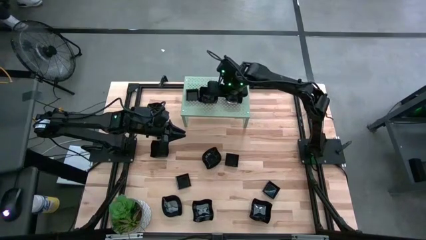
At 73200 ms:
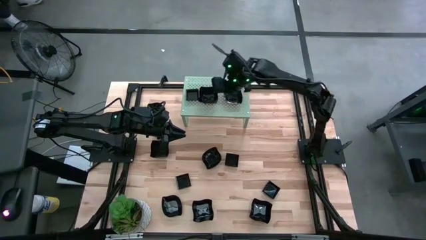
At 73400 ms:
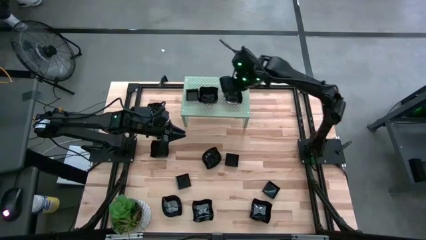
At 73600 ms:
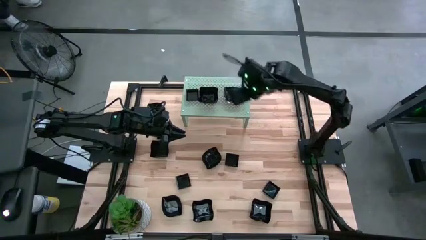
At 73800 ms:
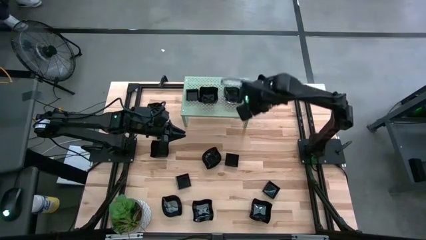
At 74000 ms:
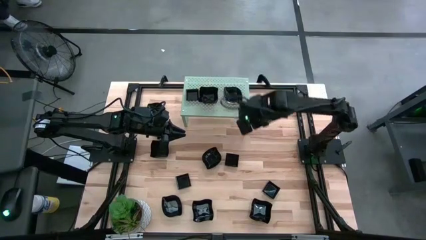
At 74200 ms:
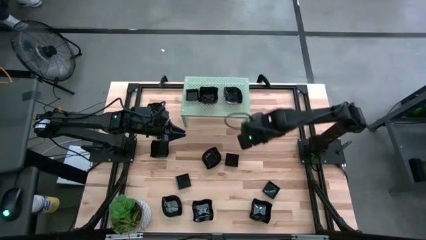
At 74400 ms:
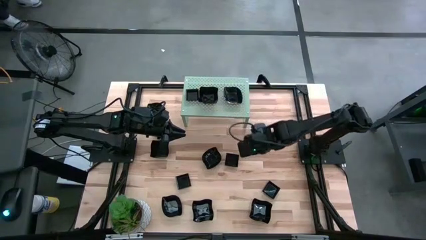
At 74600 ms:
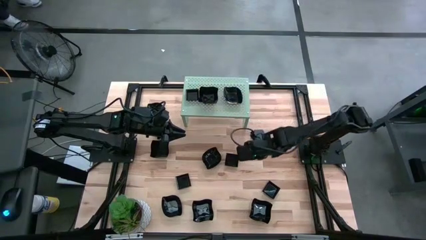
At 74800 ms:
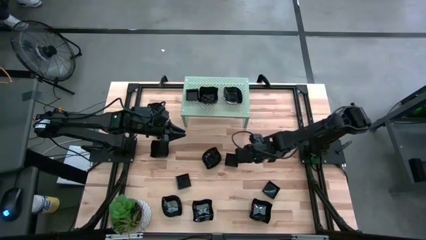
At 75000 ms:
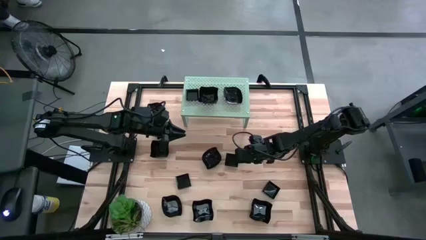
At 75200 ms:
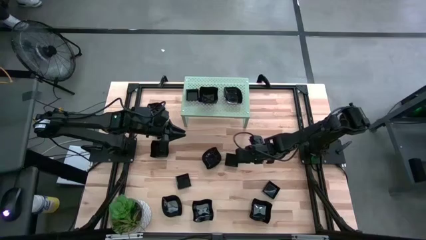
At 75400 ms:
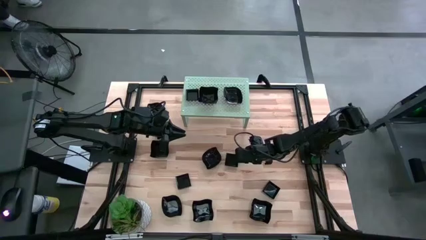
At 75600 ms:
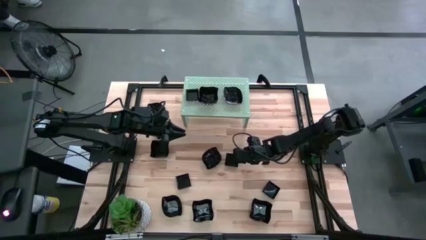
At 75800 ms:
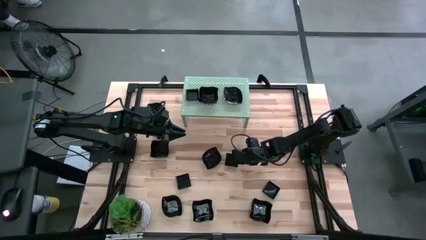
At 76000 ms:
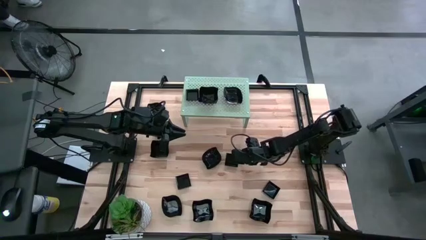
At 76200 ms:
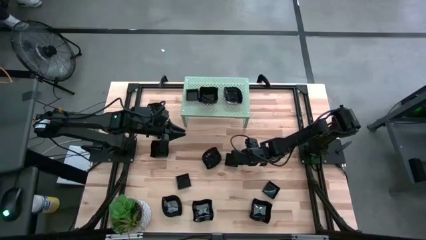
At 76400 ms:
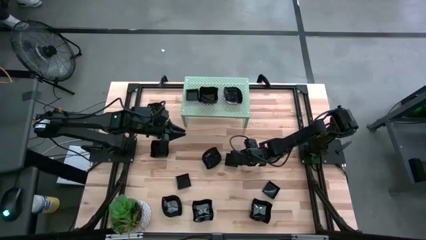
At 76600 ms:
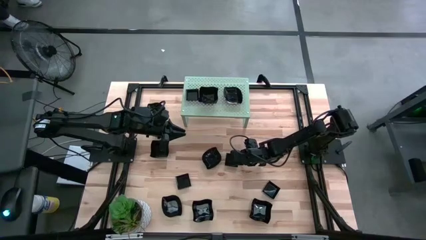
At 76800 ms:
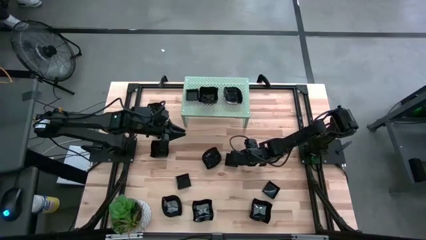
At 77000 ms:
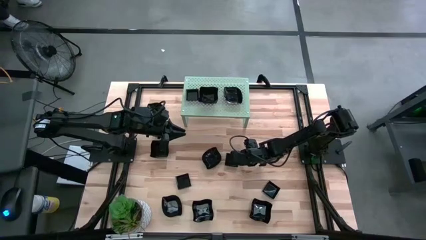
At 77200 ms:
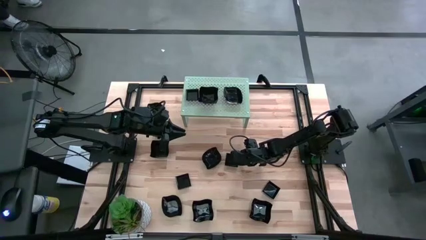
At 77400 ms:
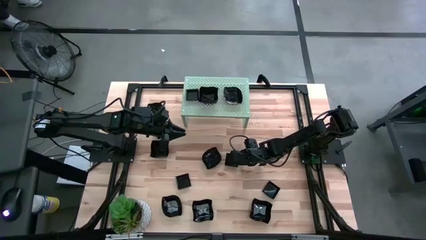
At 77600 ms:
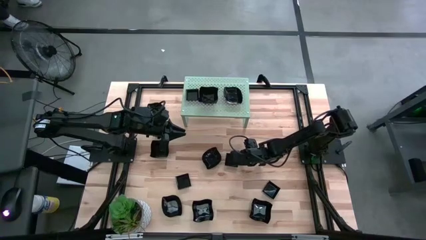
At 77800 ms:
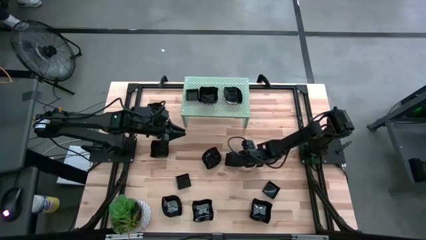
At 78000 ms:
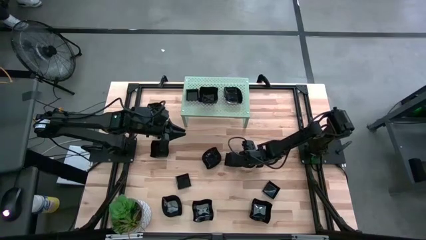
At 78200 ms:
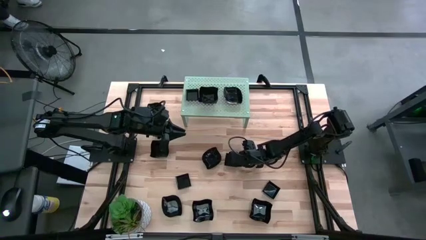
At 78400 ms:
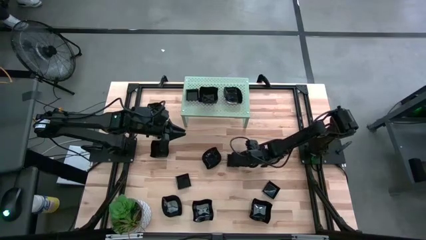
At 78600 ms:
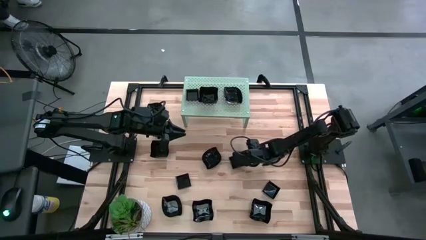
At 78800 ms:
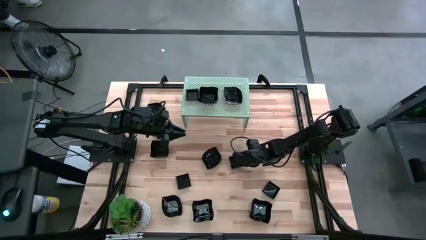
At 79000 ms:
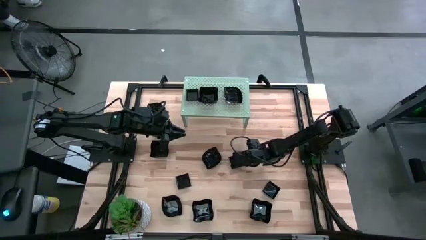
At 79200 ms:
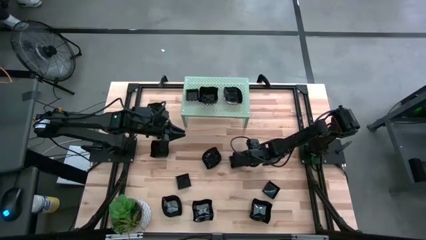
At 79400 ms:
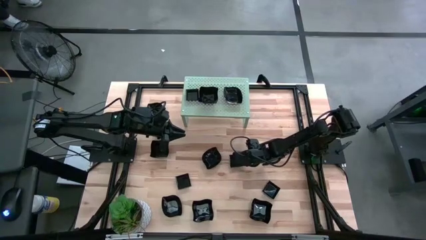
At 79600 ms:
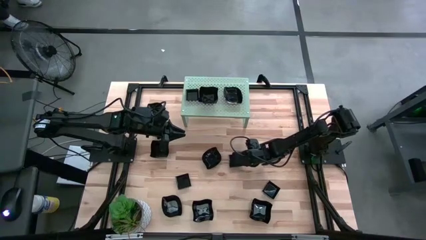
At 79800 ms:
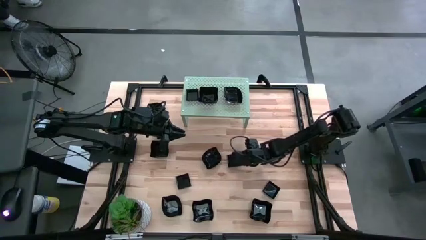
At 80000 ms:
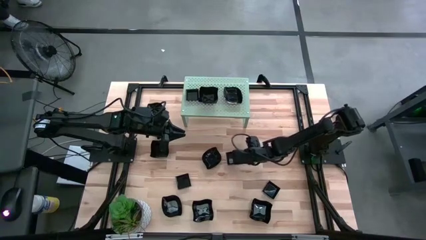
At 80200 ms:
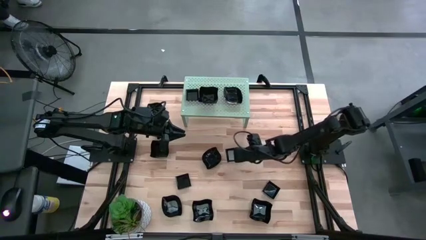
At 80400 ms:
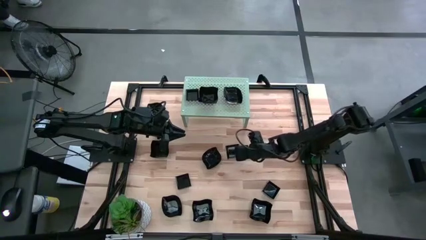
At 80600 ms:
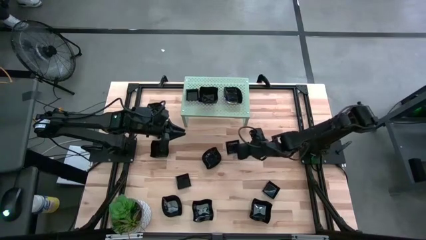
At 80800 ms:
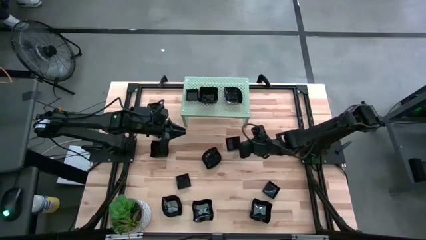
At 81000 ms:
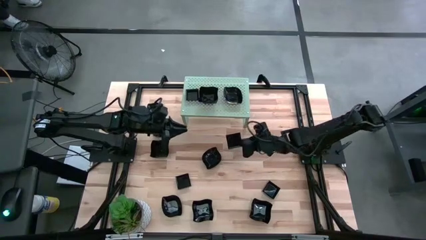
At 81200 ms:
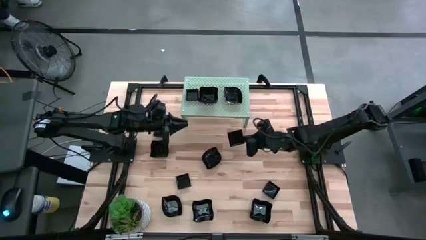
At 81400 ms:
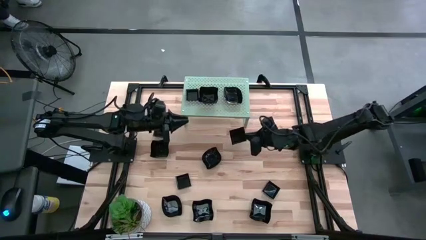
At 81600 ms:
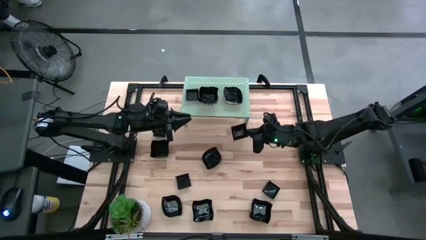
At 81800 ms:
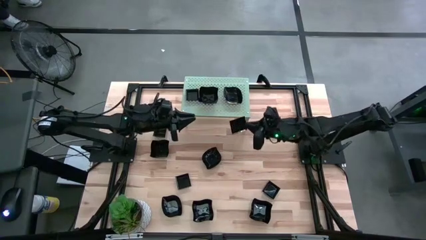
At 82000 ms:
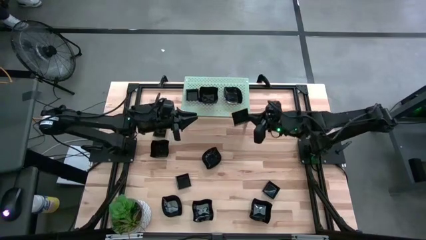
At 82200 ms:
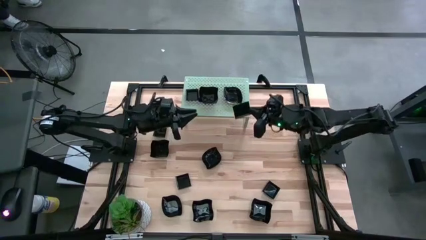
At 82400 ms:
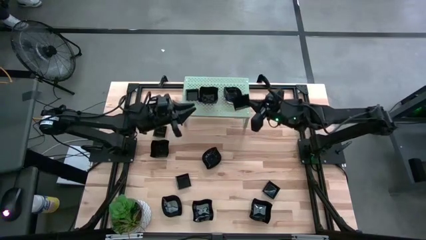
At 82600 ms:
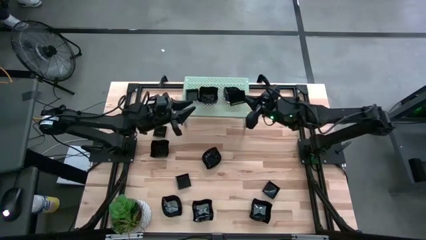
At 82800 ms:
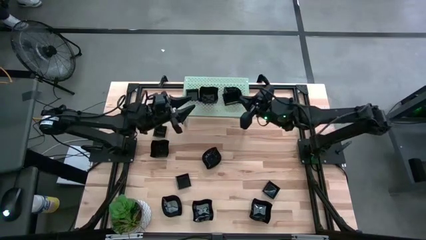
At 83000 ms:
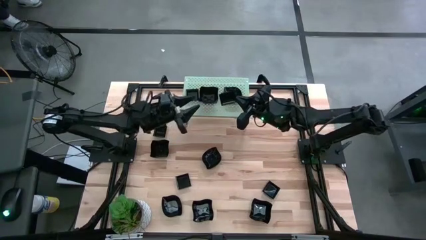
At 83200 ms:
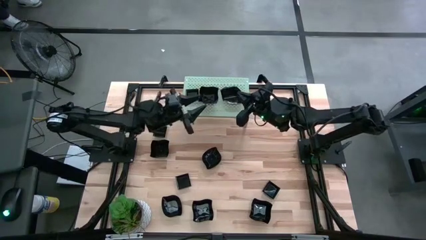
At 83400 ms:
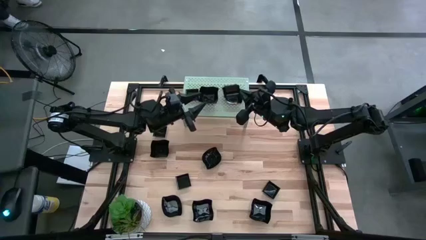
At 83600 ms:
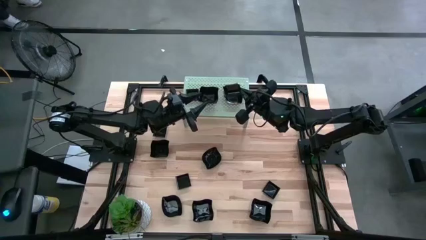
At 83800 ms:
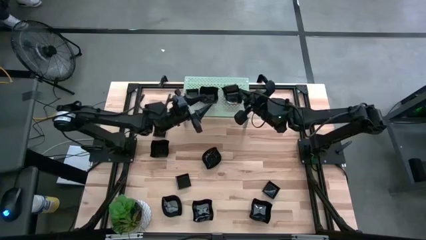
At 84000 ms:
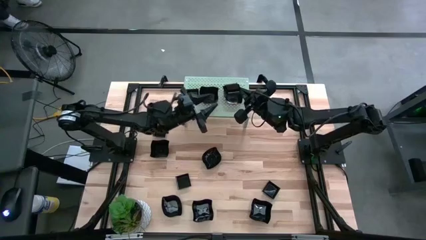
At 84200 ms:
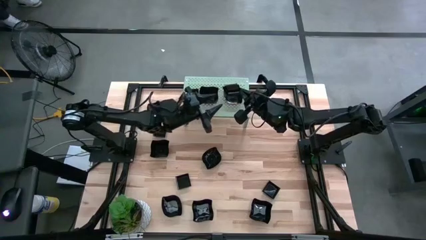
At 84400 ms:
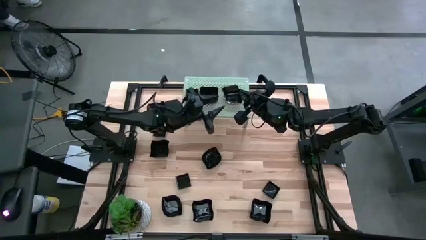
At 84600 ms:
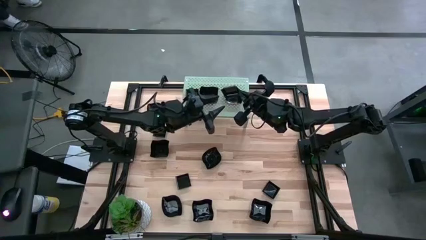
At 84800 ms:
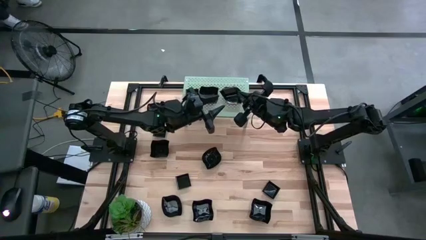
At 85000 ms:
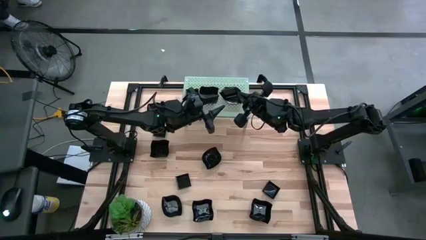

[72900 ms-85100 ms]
Task: Pick & Place Mini shaped plates
Stack the square shaped plate on top of the square shaped plate on the shelf
